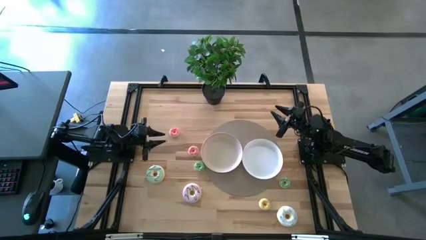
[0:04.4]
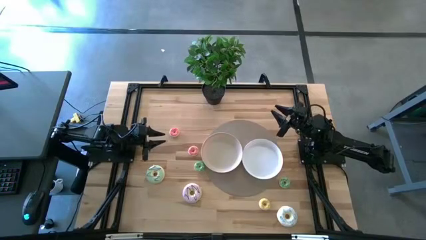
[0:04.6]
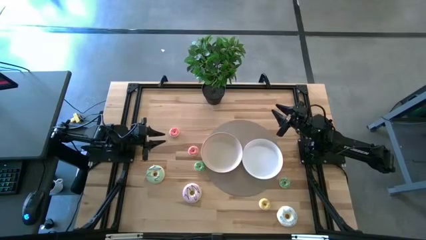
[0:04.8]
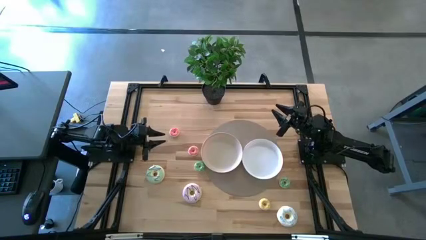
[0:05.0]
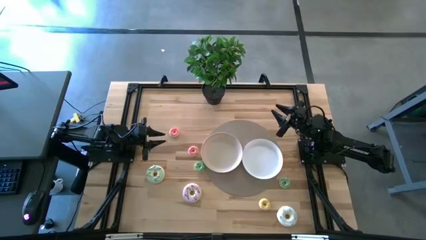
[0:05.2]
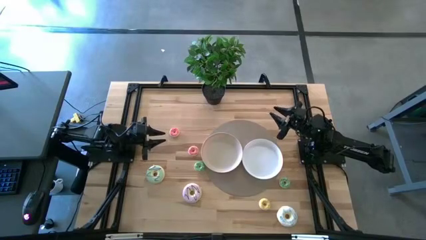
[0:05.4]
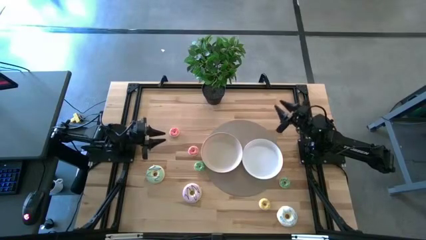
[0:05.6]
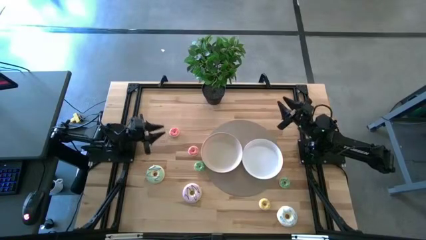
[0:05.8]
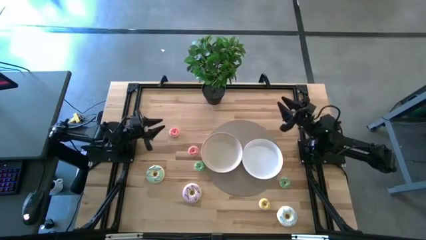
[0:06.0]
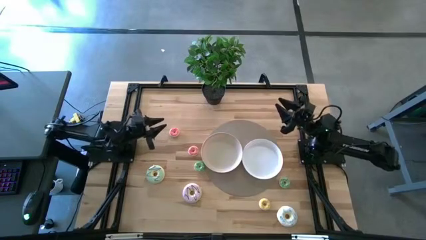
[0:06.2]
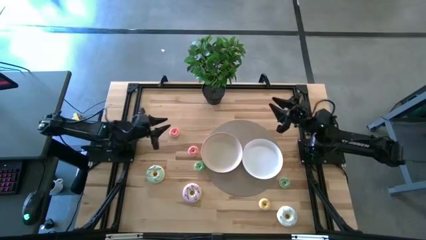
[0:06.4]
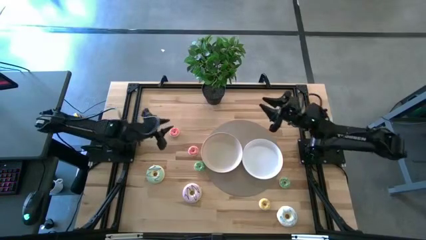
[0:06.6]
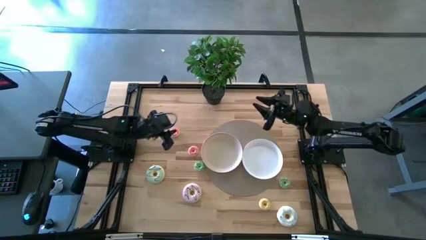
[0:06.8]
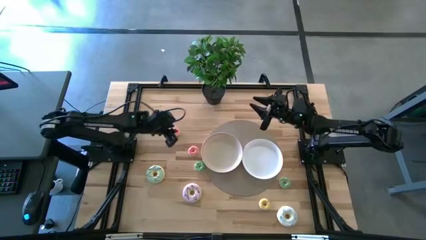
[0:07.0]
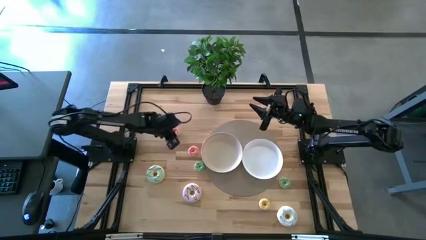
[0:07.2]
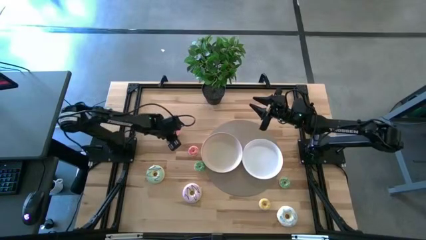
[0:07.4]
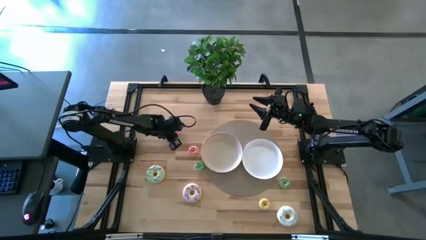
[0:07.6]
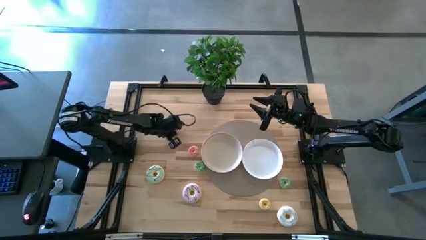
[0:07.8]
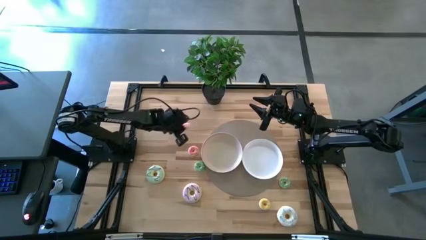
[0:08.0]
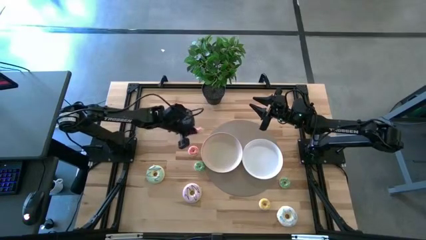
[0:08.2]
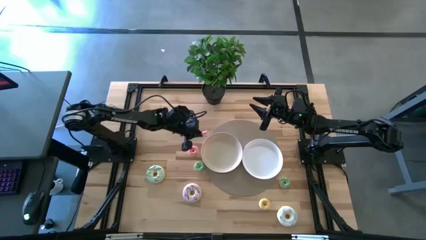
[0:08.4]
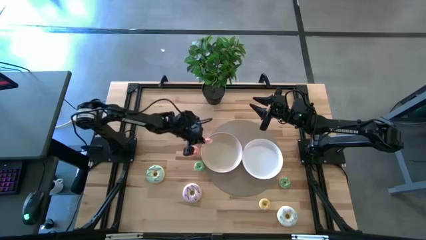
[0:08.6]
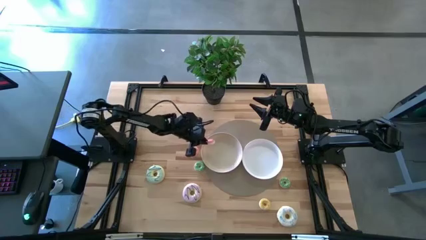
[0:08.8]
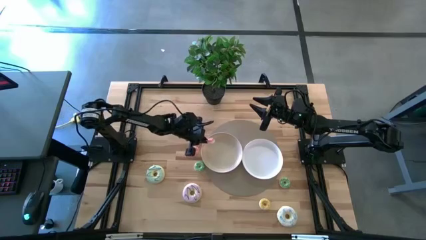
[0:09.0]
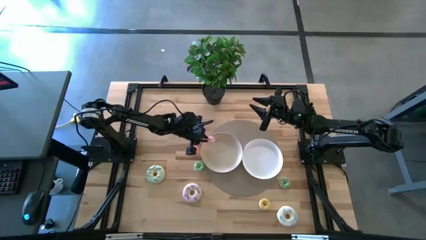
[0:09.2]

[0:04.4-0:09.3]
Task: Pick & Place donuts
Put the top small pink donut into the left white plate

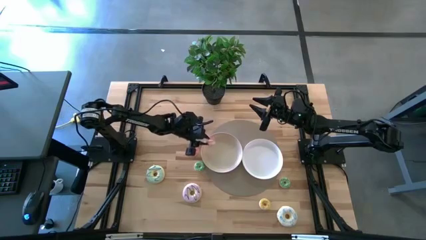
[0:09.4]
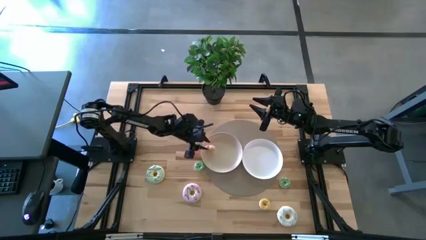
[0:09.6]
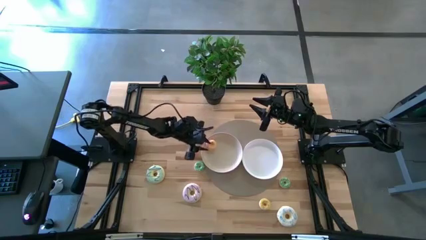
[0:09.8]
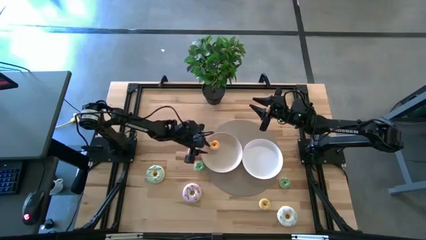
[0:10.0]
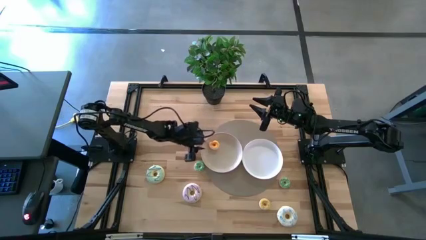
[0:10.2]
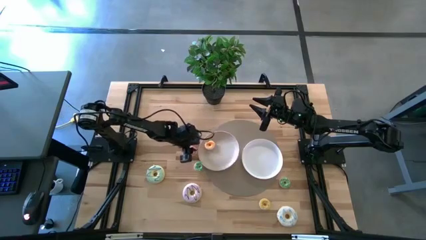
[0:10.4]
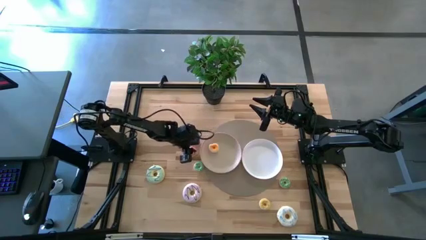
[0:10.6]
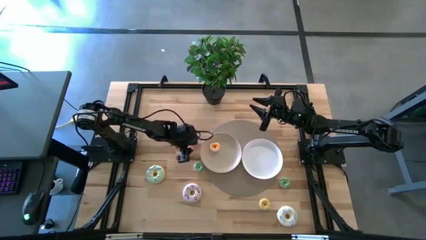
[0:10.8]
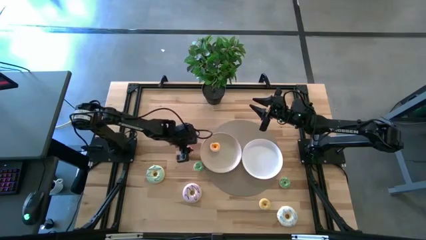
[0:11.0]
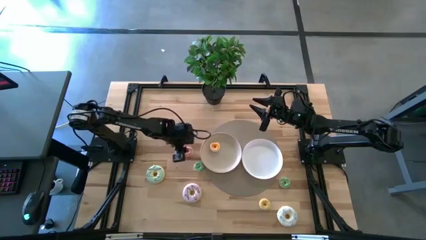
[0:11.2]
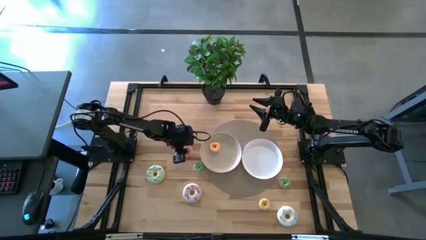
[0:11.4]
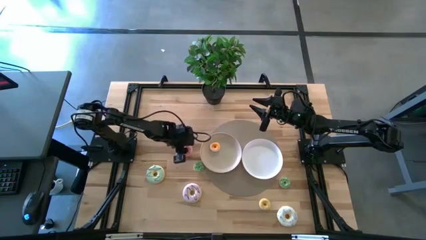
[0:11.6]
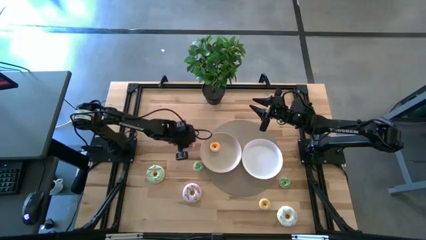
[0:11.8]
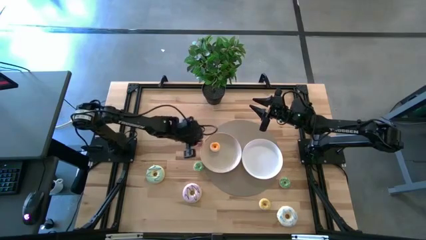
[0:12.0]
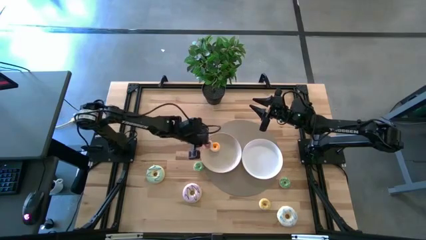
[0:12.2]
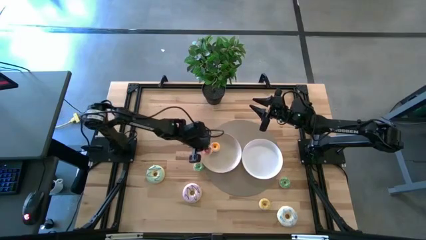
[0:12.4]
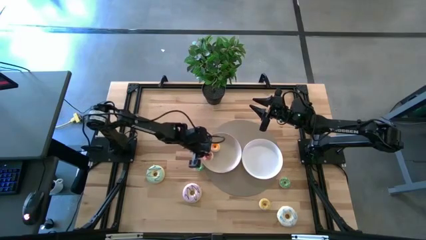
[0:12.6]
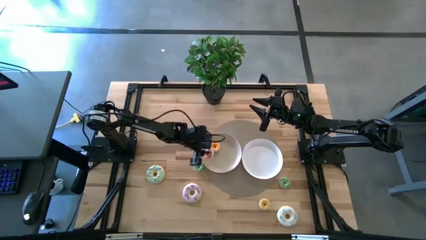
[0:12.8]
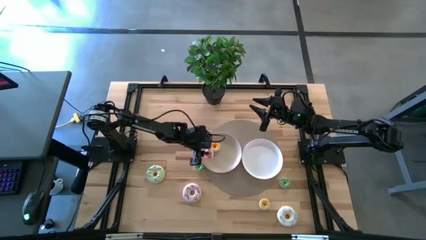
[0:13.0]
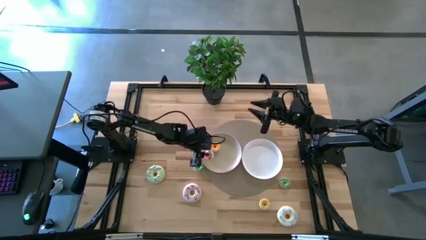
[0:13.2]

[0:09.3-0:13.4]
Put the small pink donut into the left white plate

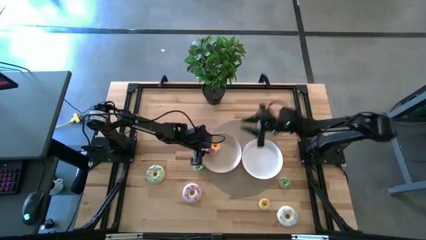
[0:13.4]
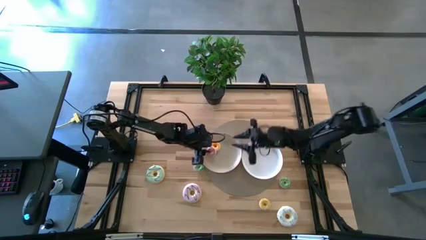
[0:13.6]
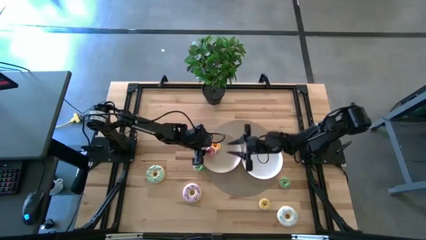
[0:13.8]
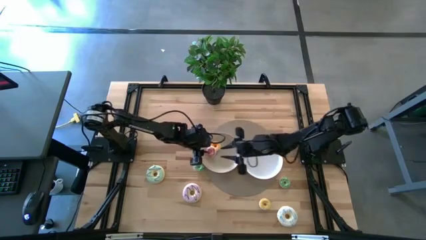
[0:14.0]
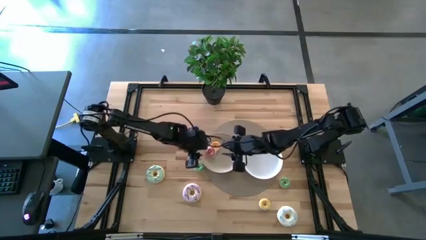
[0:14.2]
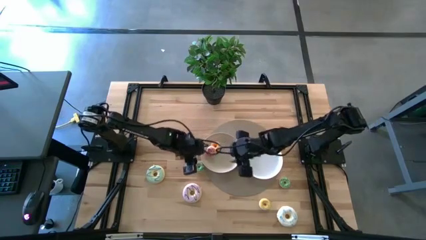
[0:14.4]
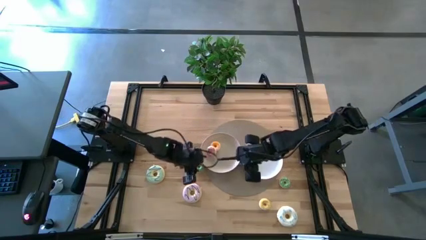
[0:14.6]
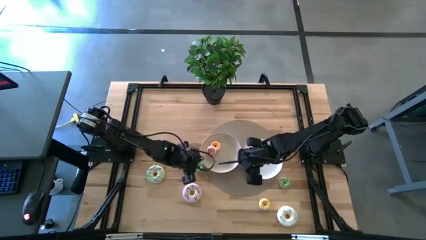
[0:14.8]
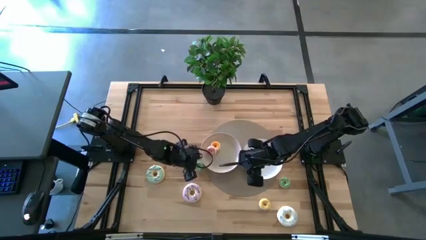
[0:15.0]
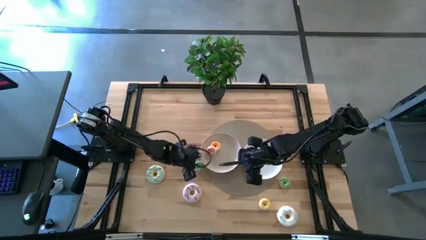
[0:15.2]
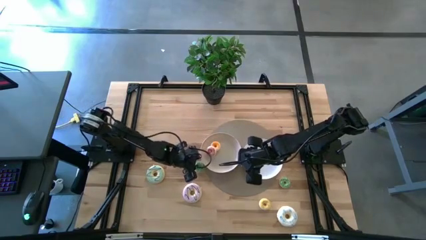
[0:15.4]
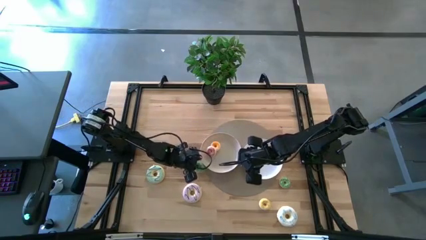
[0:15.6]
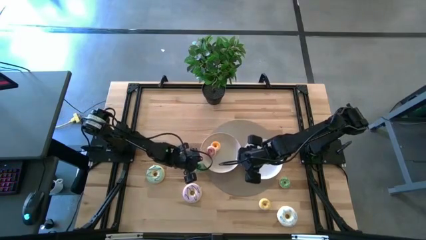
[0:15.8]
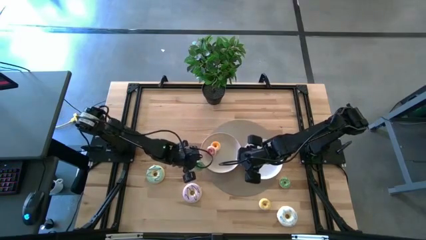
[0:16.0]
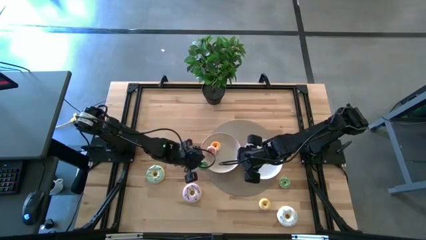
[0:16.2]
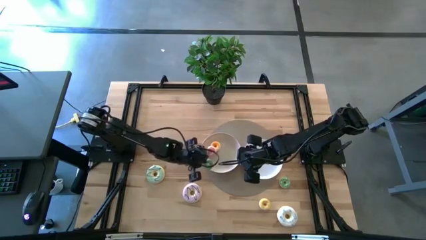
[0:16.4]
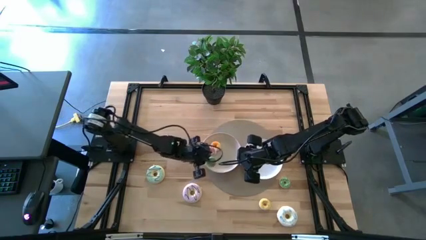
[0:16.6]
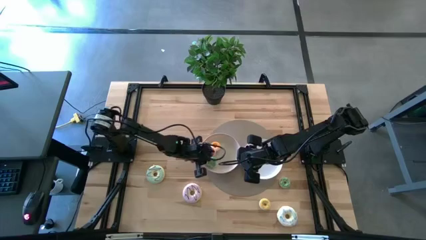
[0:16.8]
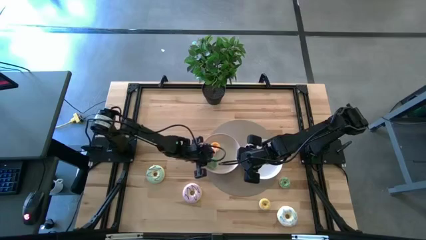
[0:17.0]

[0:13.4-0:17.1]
Put the left small green donut into the left white plate

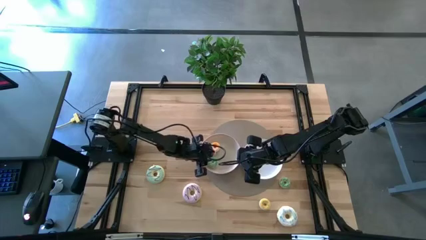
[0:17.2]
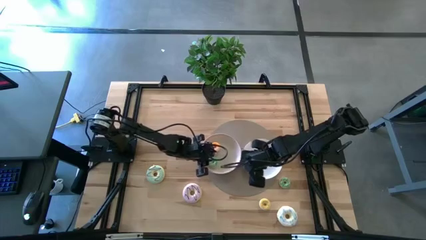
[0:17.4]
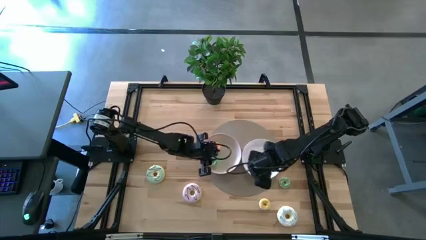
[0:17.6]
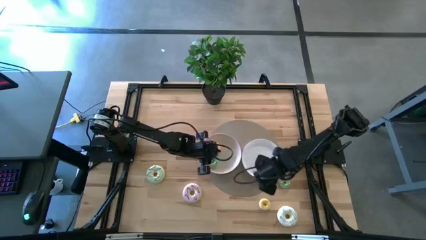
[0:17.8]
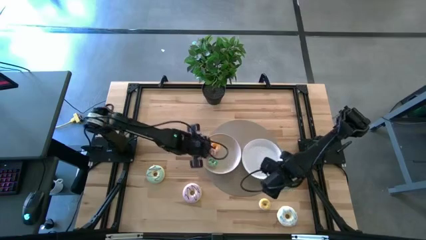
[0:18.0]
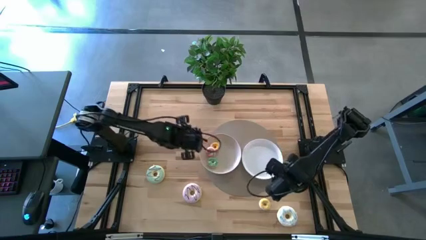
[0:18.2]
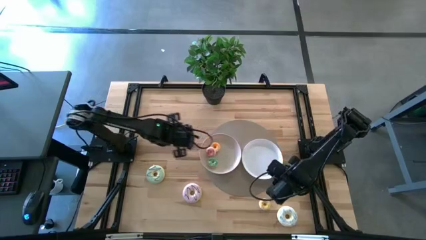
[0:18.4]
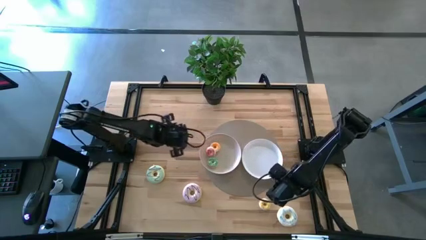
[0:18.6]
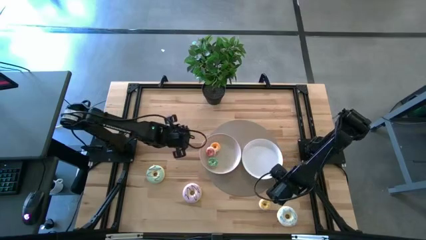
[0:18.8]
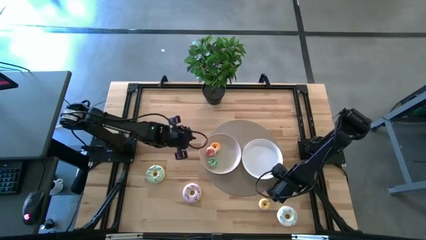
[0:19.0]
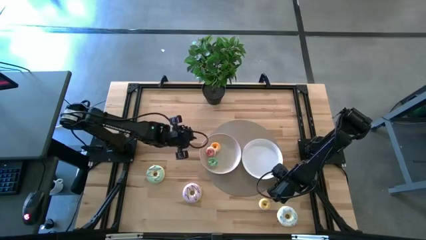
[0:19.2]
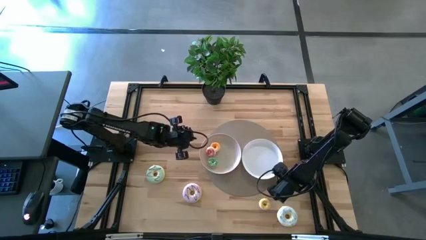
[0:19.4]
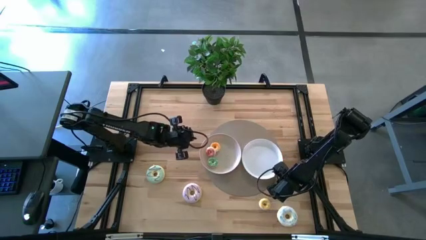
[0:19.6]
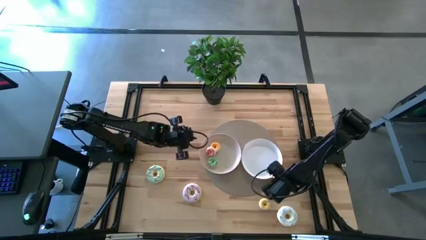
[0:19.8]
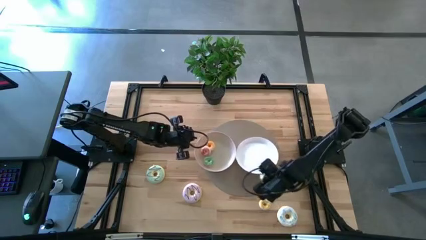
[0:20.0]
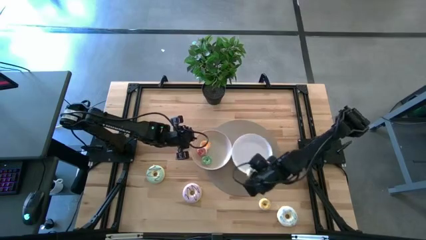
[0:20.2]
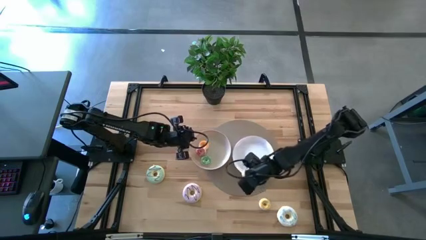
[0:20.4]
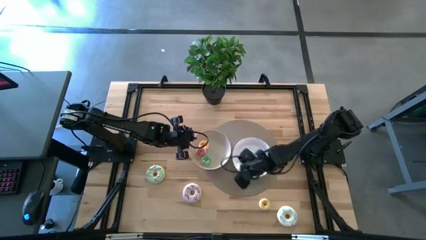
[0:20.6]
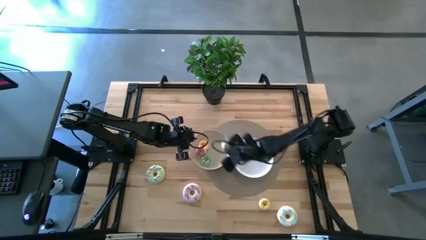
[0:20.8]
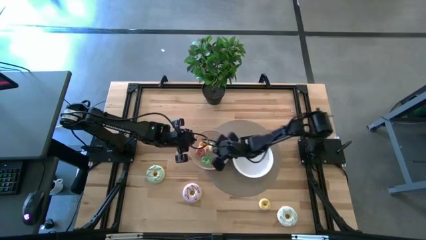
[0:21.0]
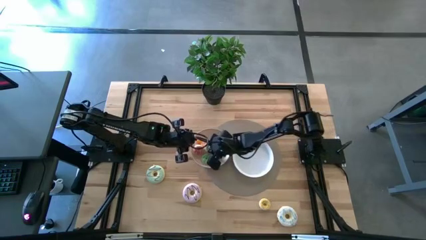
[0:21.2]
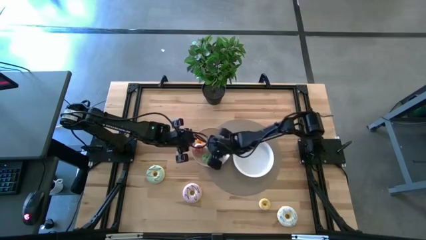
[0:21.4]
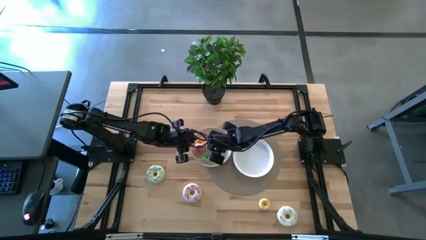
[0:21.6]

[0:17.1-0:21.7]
Put the small green donut into the left white plate

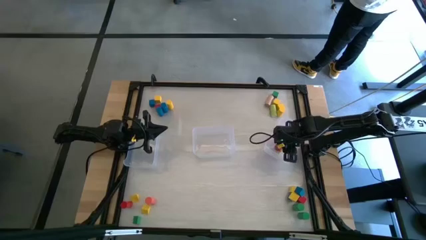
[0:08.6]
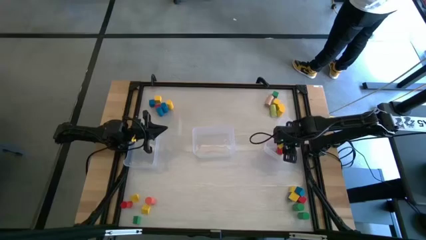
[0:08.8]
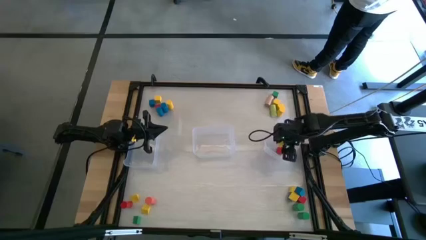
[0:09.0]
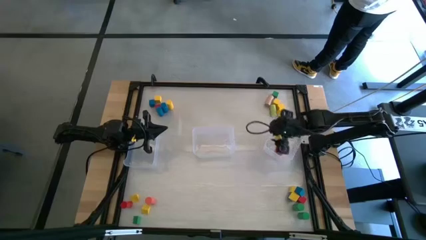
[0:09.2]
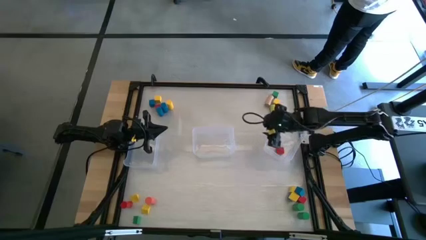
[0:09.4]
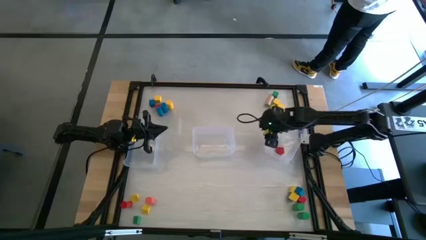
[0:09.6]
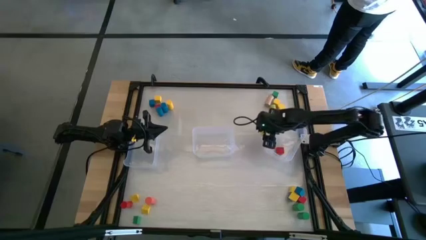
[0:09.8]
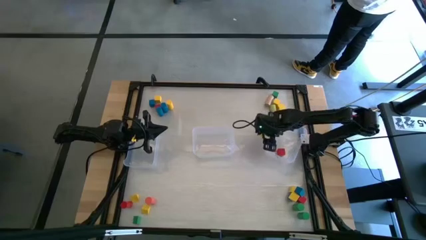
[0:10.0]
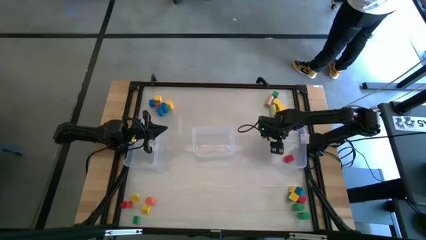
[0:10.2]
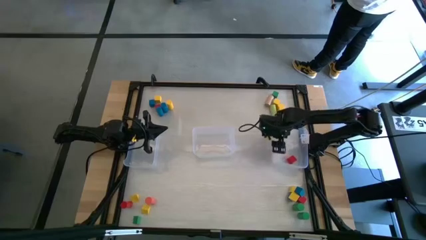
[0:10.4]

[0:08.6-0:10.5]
Task: Sort blocks by size
Adjust the right transparent bin
